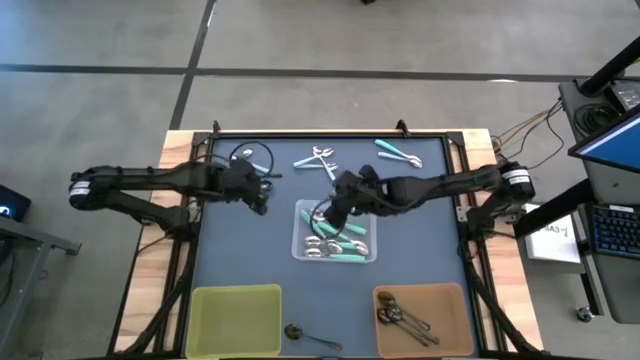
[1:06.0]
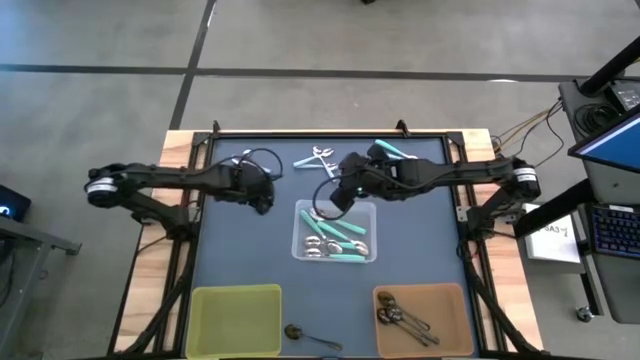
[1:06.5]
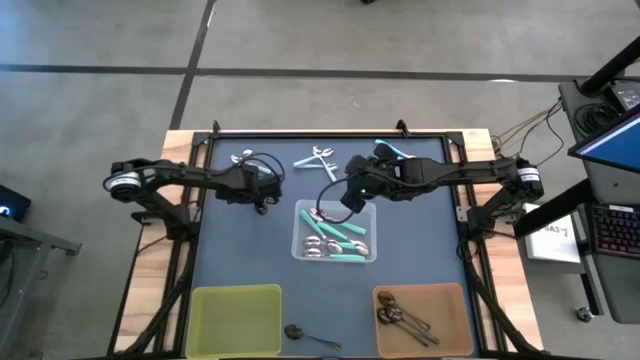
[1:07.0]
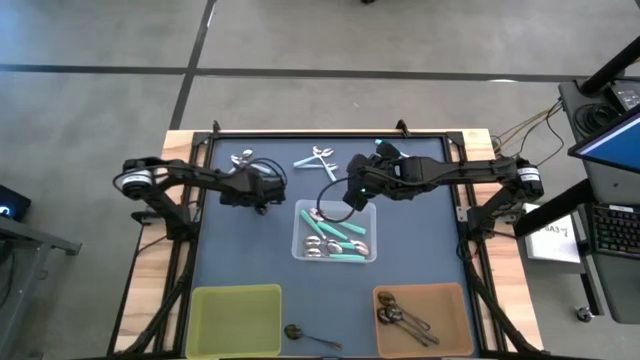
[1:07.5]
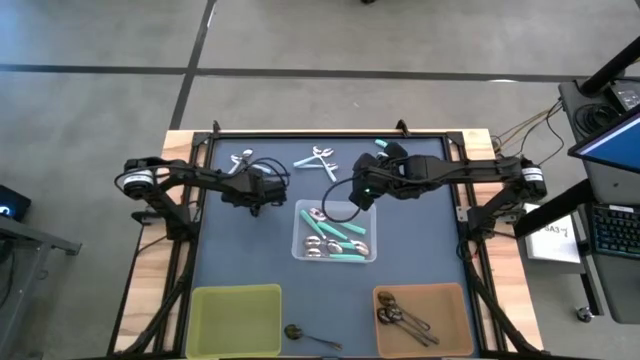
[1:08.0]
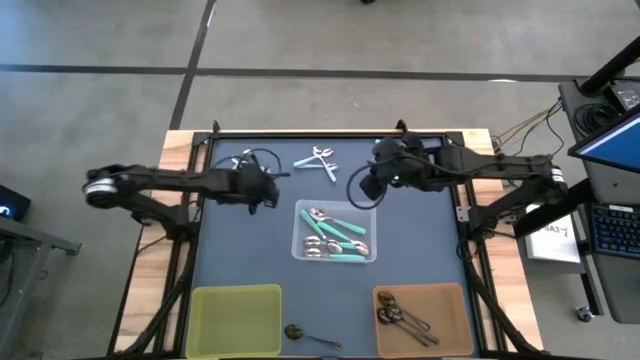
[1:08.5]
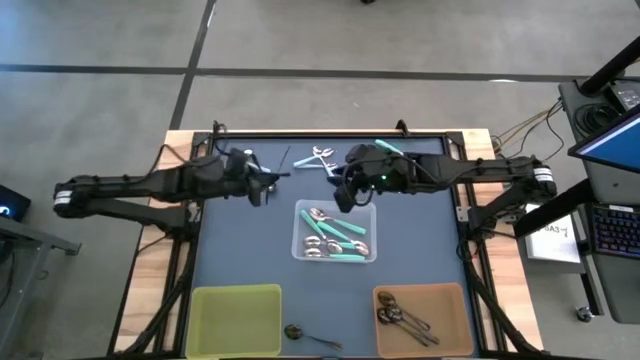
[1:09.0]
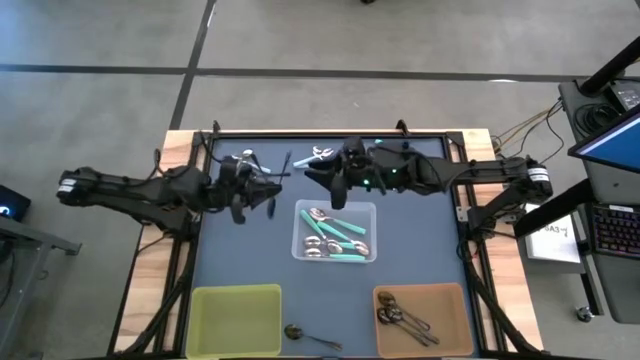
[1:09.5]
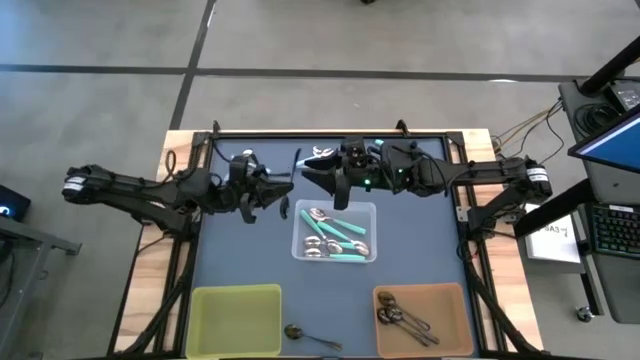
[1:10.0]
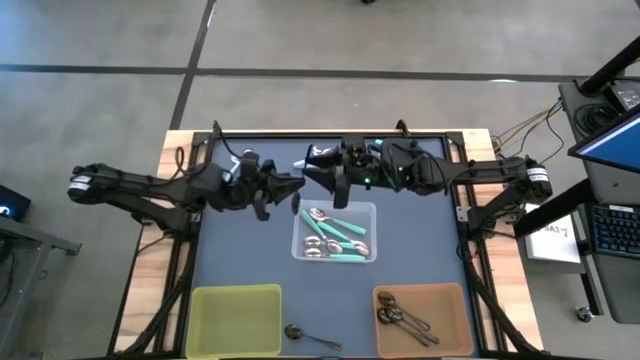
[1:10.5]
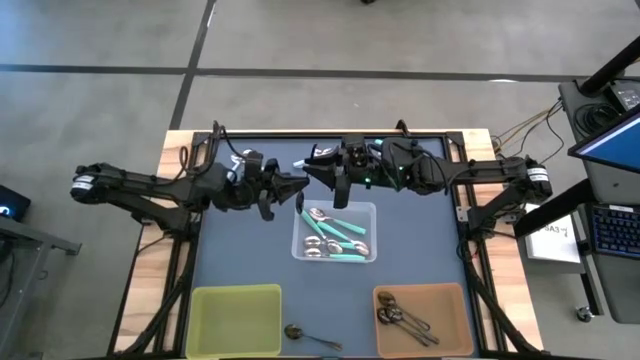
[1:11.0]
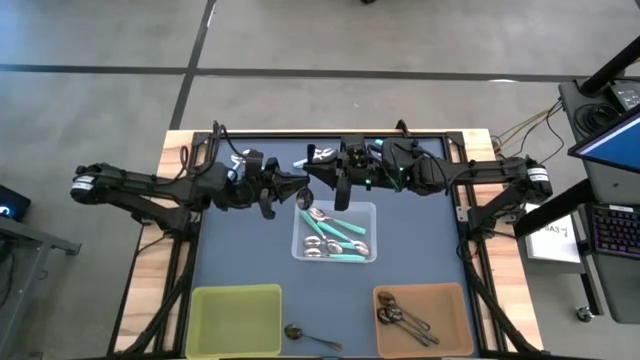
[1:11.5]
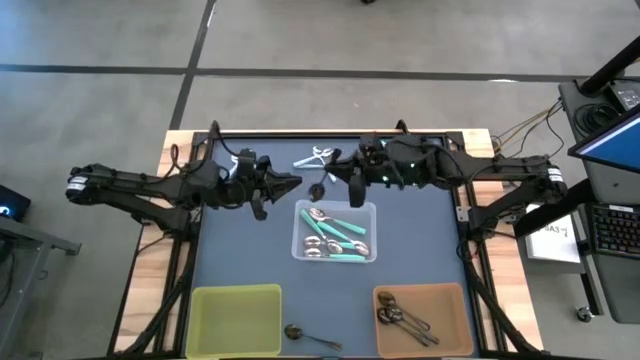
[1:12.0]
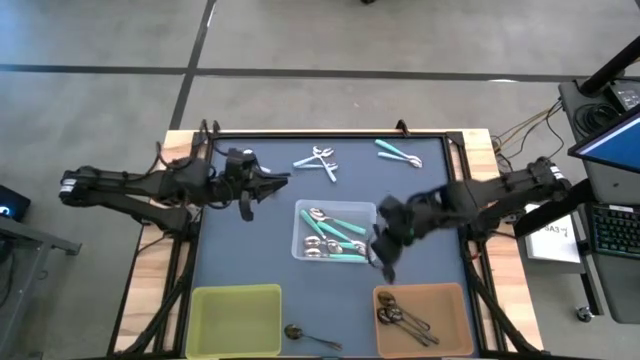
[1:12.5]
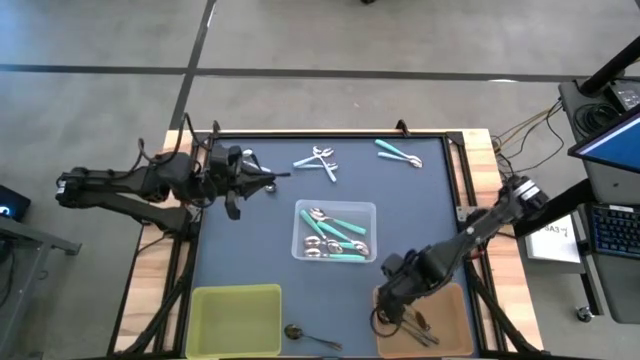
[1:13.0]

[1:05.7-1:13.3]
Task: Sort silverware by color (type)
Put the black spoon into the orange bin

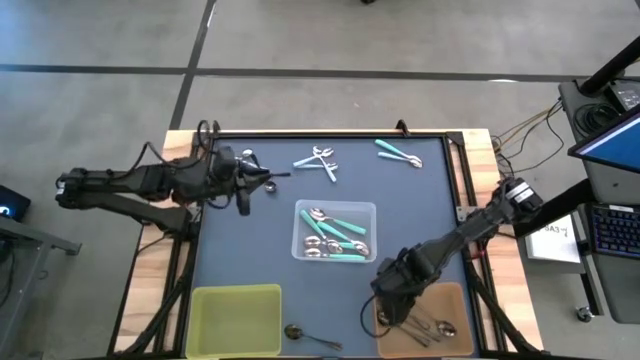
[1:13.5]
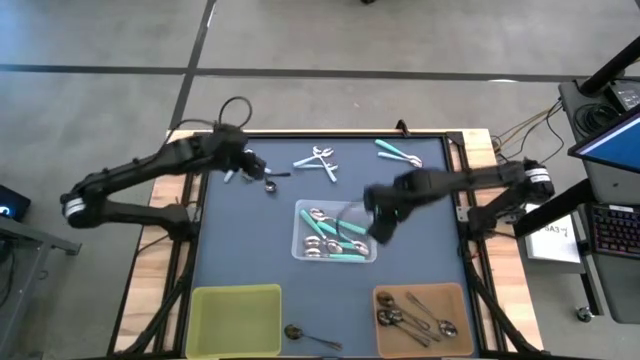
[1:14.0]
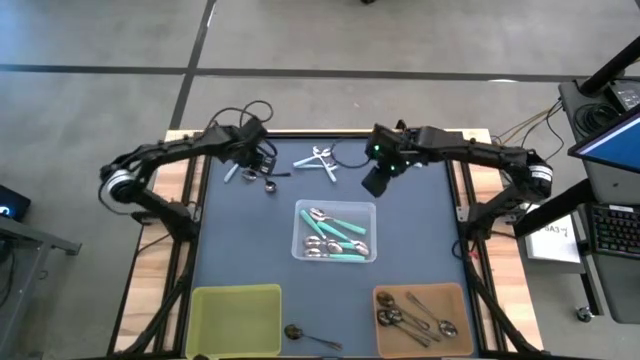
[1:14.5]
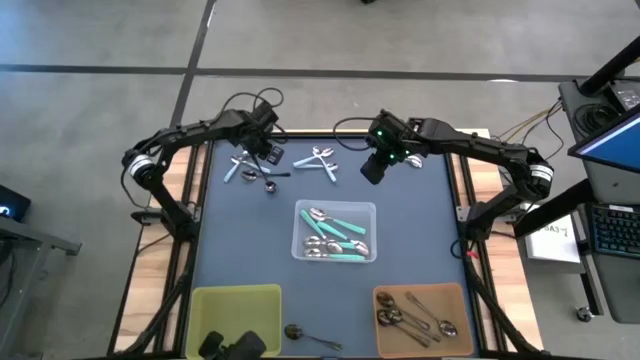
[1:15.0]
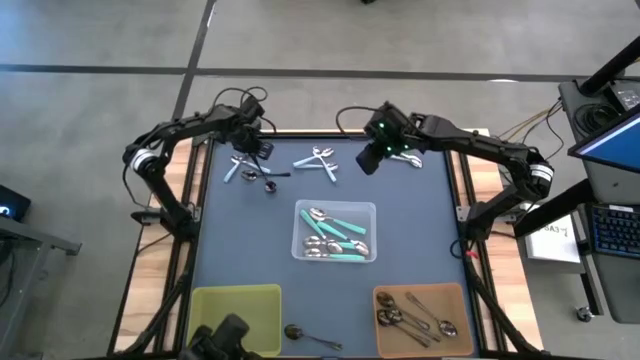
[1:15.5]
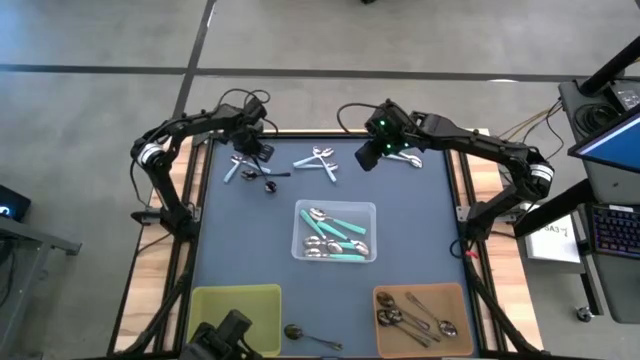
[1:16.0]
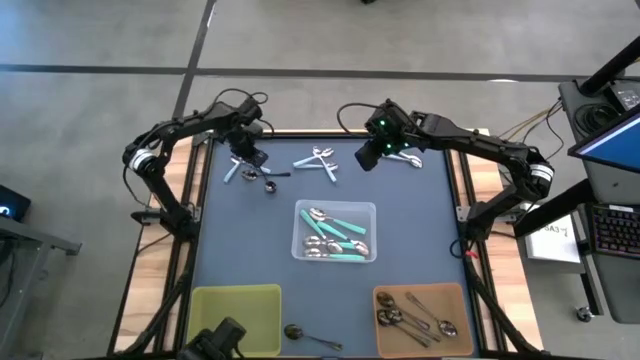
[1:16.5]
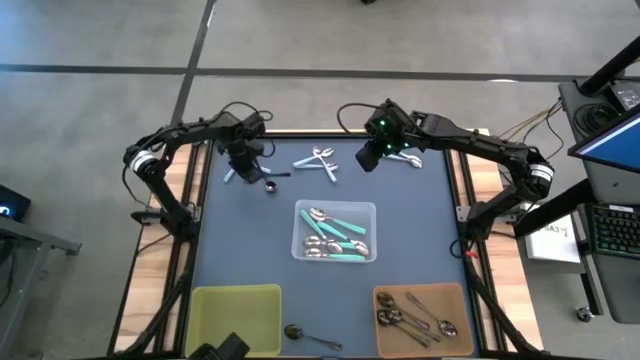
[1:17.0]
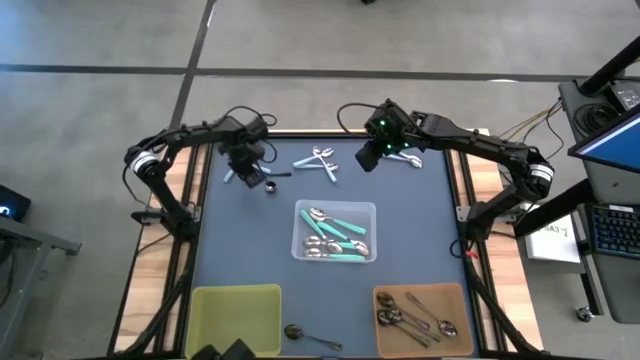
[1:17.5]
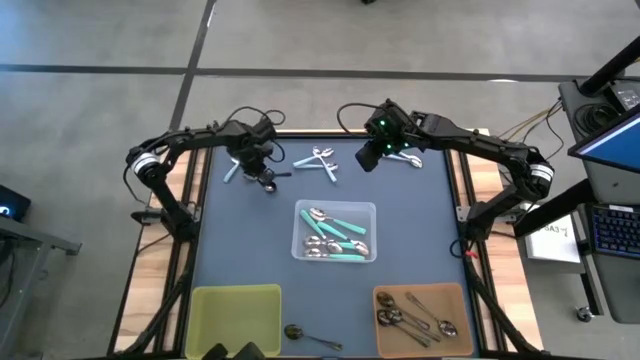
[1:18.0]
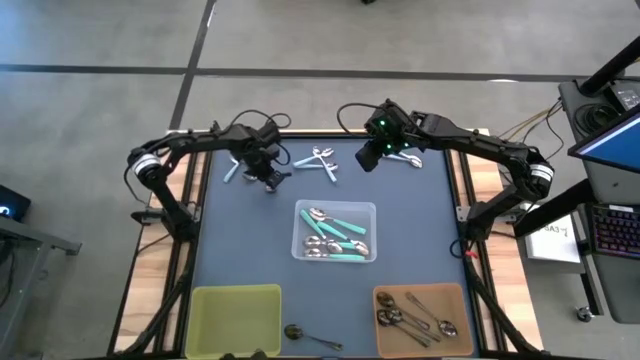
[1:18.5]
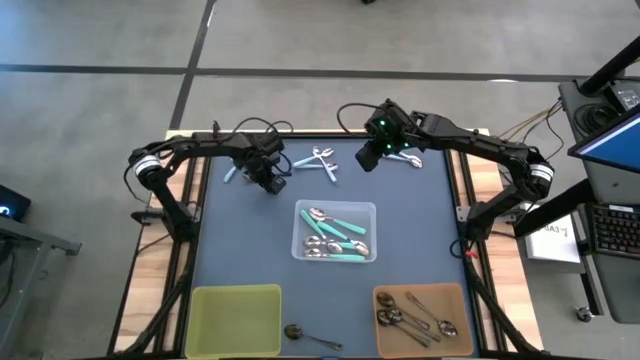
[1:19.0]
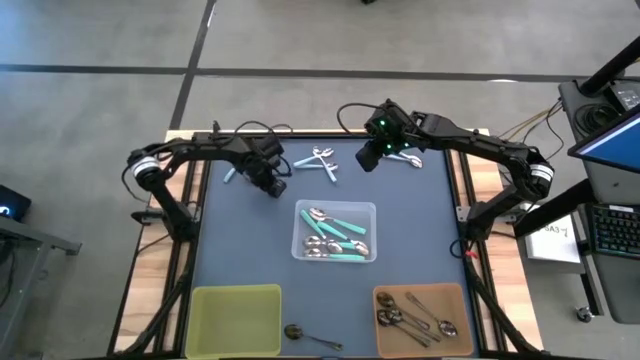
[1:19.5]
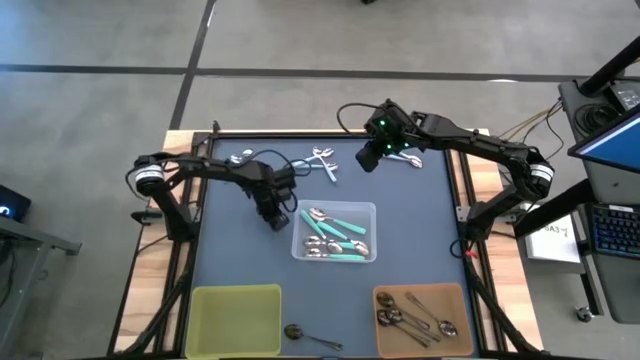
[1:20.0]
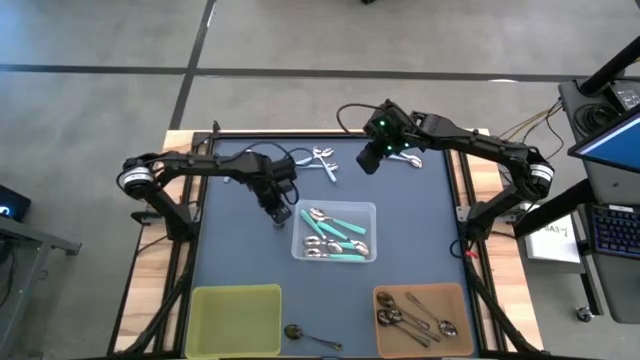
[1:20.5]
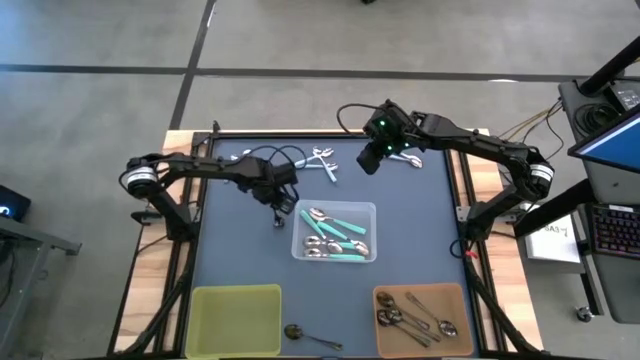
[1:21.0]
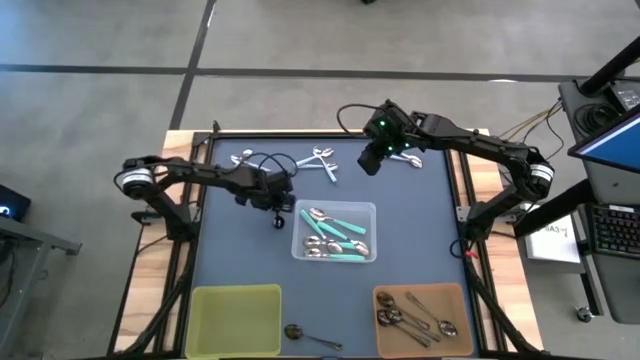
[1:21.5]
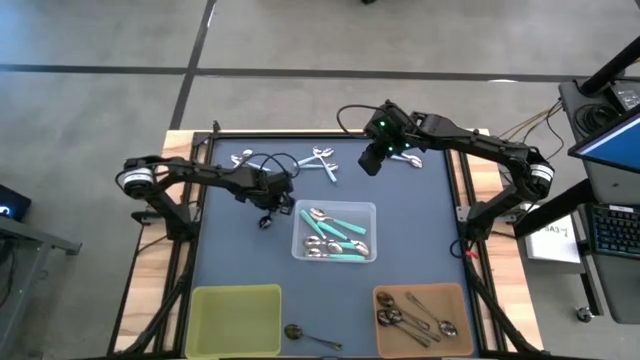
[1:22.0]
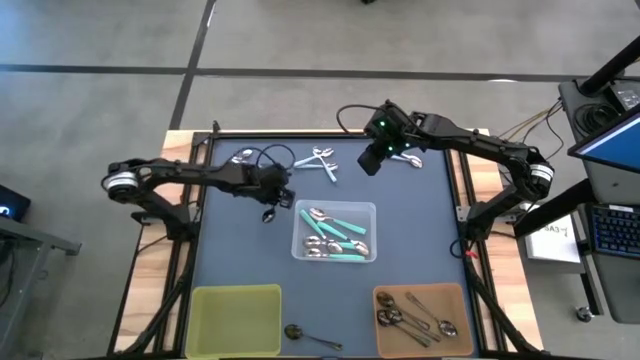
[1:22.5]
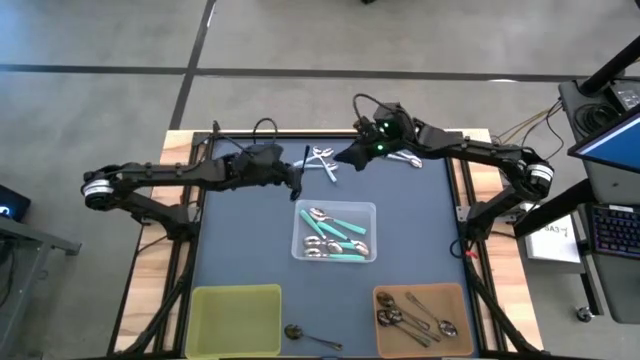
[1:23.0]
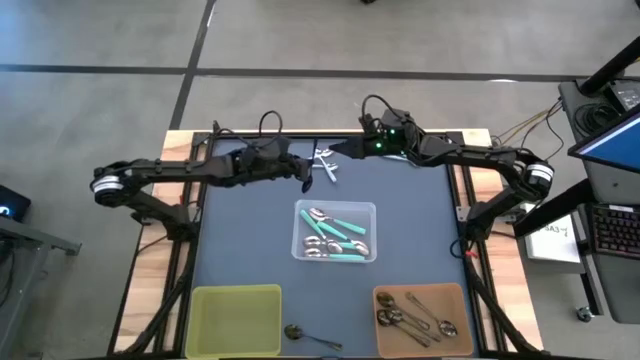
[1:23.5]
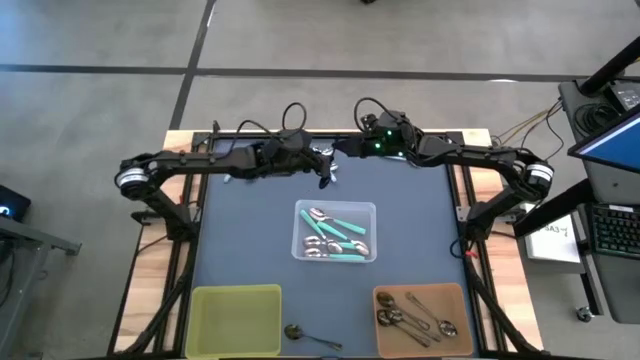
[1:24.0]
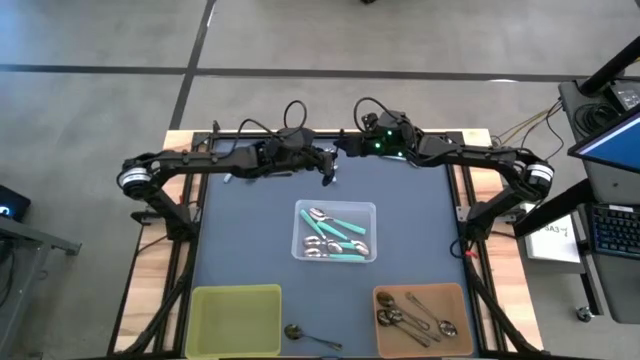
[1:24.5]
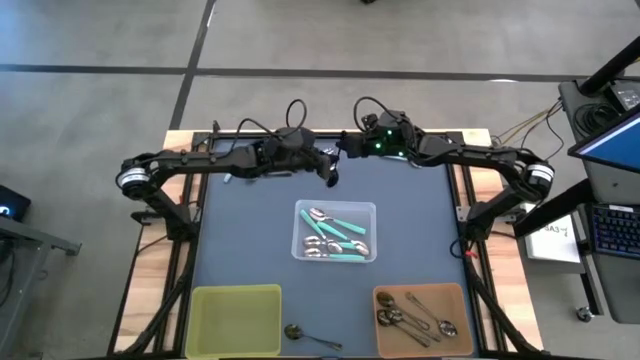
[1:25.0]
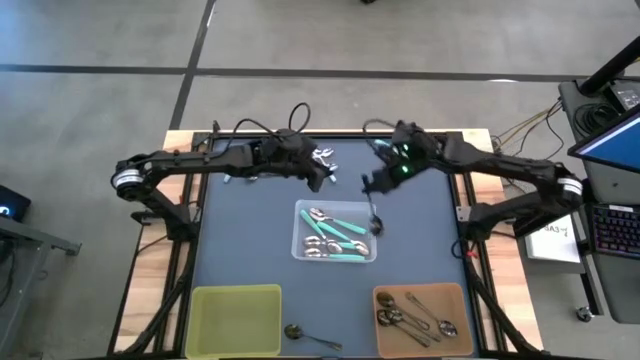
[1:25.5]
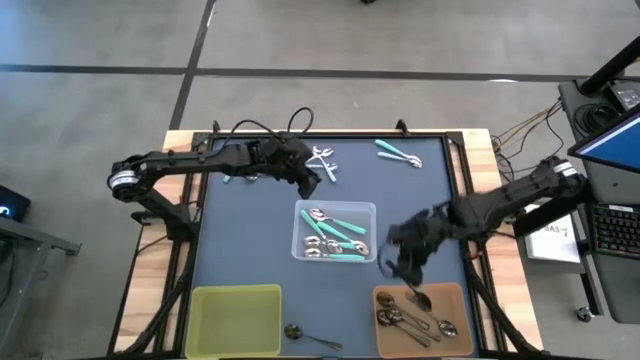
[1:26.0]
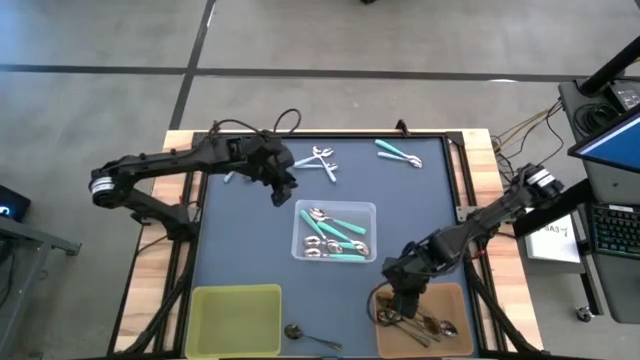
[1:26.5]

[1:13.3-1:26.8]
Put the black spoon into the orange bin

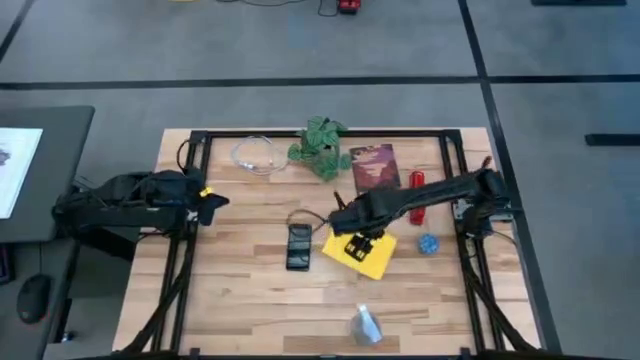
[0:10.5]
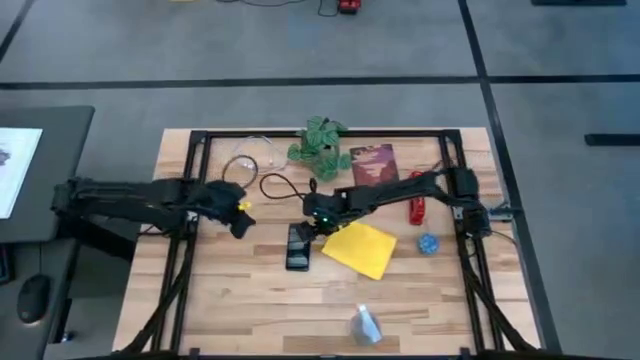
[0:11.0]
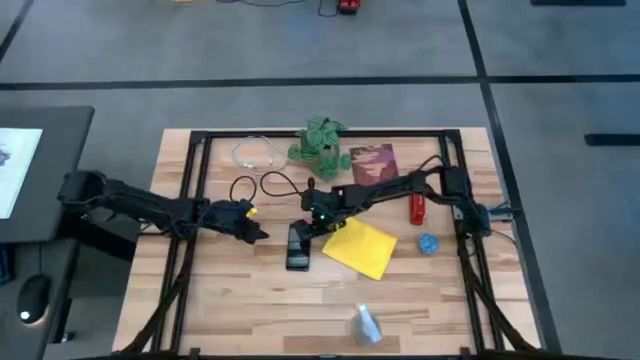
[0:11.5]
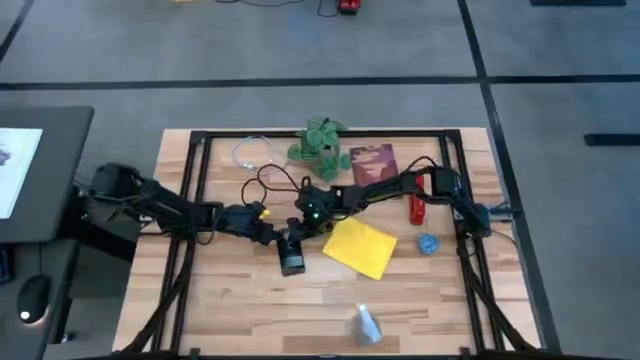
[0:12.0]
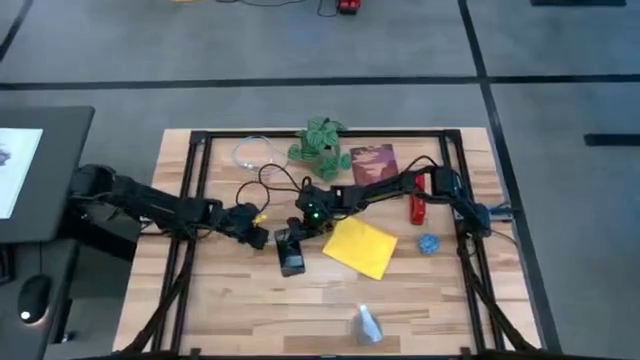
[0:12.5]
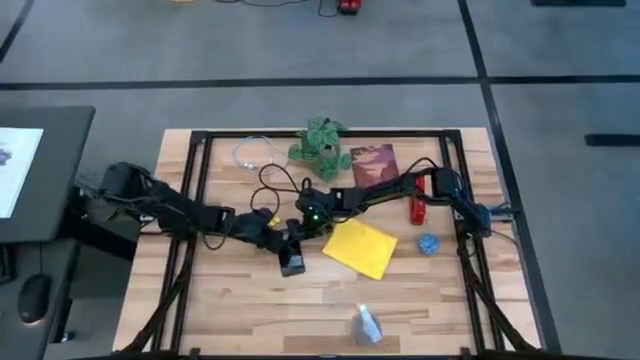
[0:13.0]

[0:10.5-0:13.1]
Task: Apply microfiber cloth
Spray the front of the cellphone with the spray cleaning bottle
